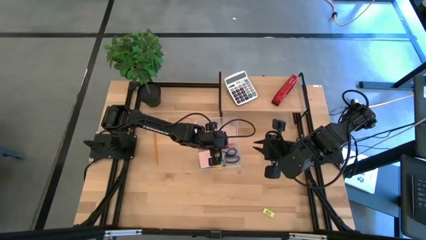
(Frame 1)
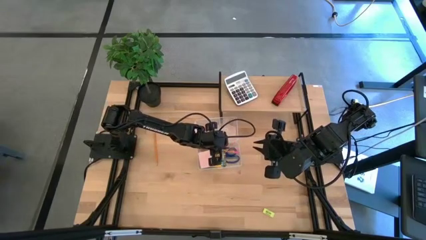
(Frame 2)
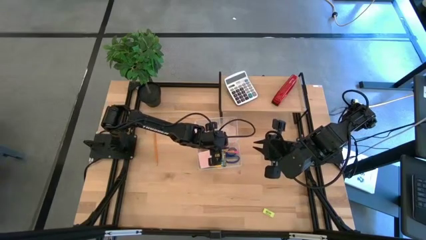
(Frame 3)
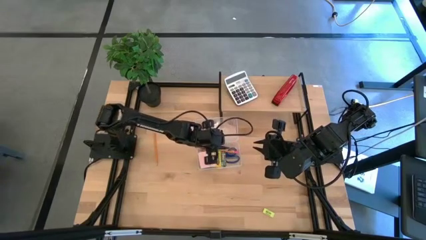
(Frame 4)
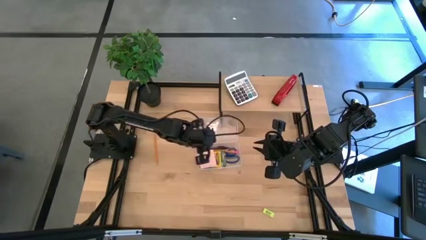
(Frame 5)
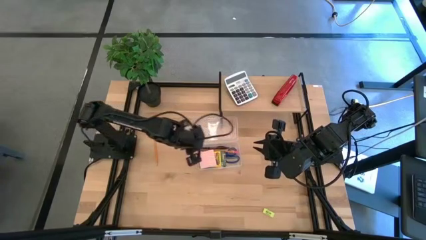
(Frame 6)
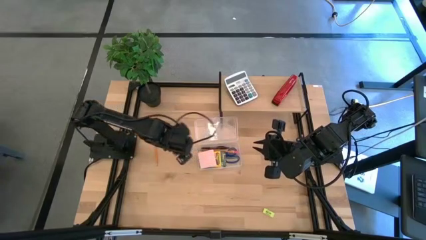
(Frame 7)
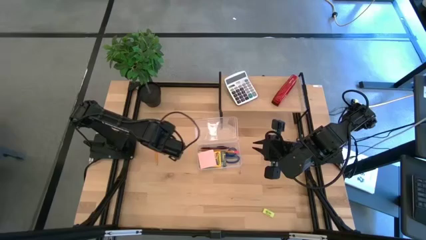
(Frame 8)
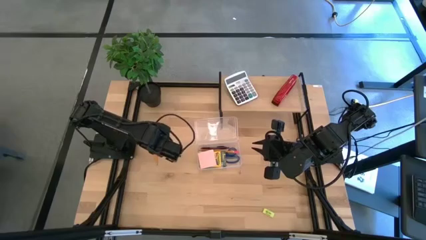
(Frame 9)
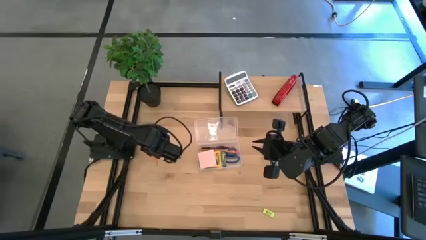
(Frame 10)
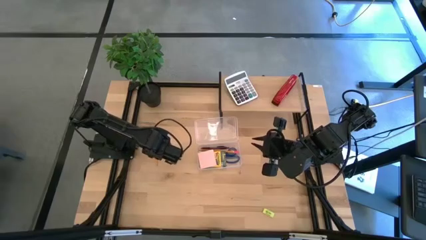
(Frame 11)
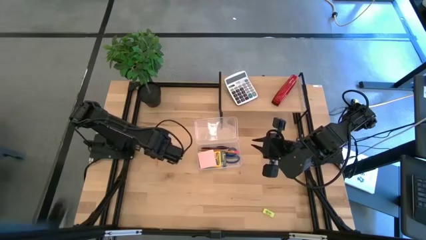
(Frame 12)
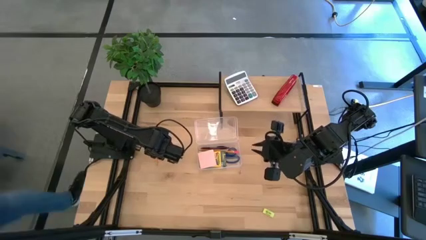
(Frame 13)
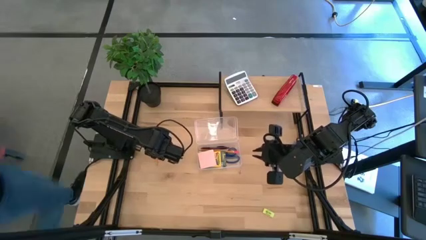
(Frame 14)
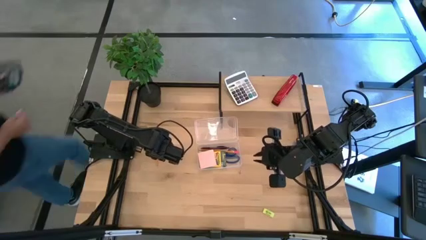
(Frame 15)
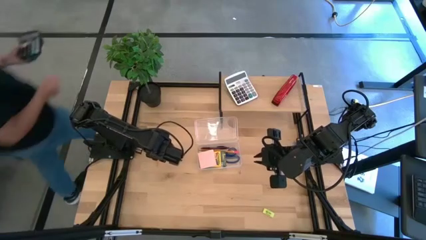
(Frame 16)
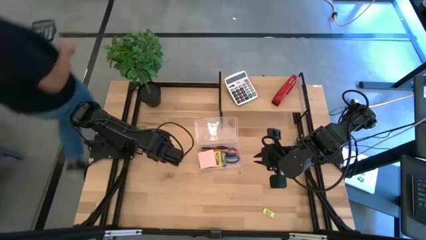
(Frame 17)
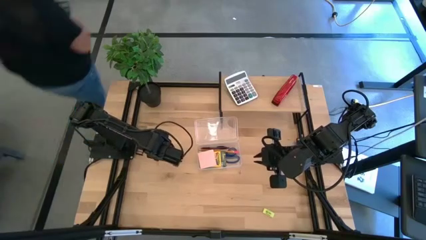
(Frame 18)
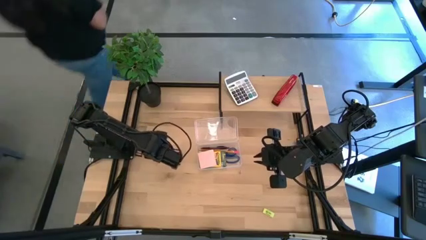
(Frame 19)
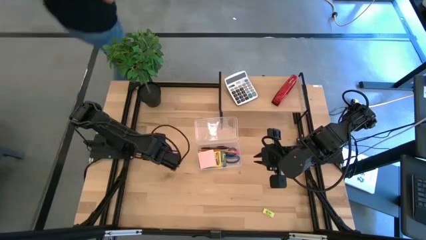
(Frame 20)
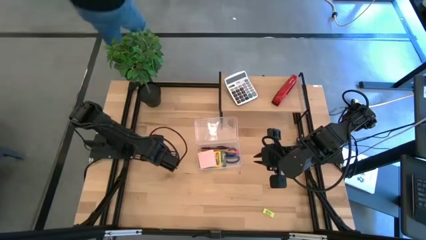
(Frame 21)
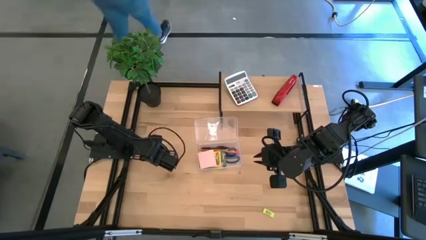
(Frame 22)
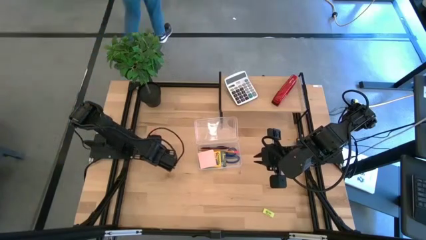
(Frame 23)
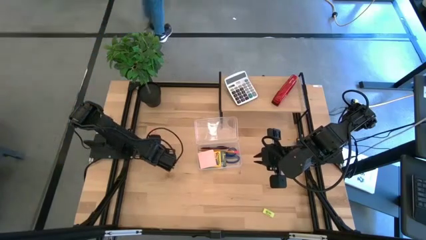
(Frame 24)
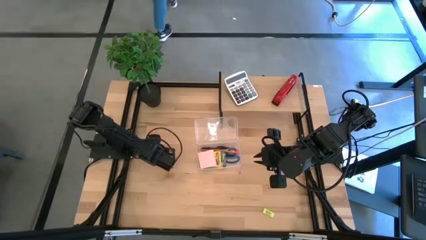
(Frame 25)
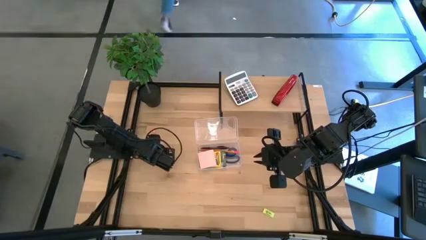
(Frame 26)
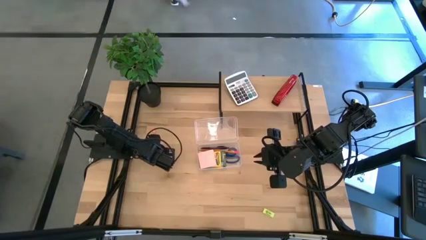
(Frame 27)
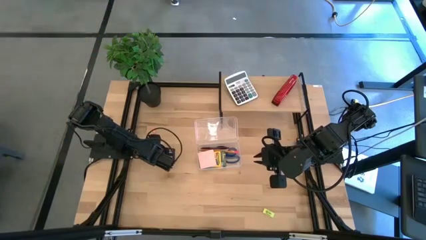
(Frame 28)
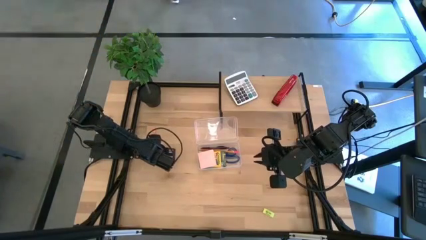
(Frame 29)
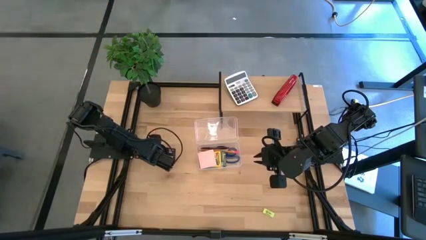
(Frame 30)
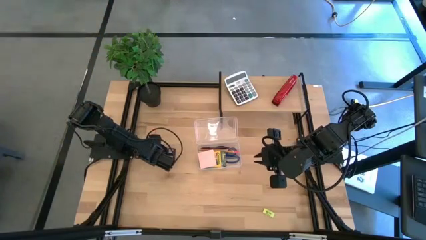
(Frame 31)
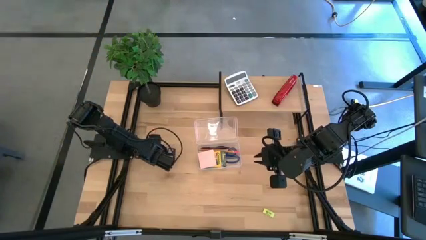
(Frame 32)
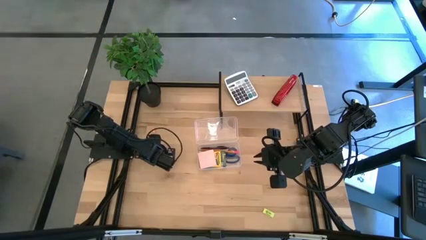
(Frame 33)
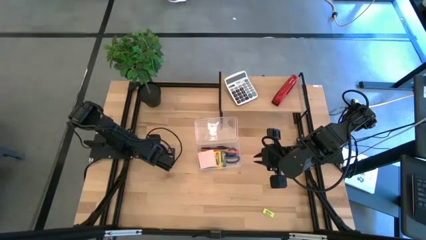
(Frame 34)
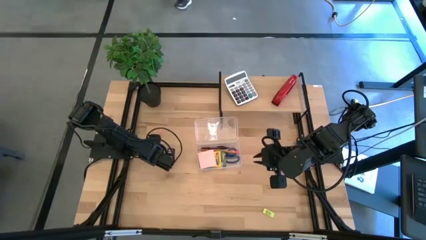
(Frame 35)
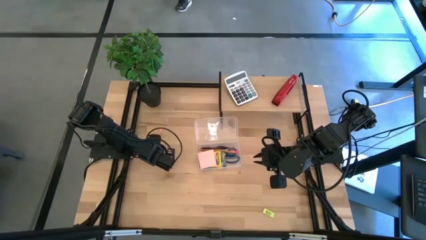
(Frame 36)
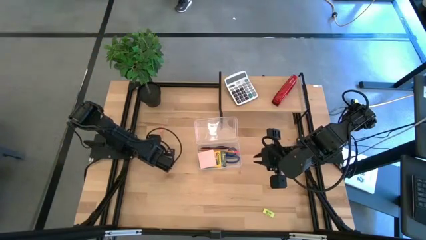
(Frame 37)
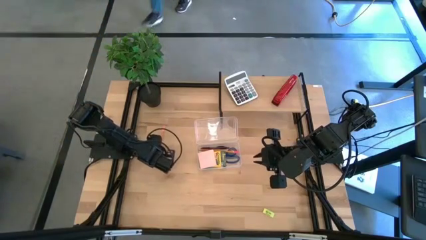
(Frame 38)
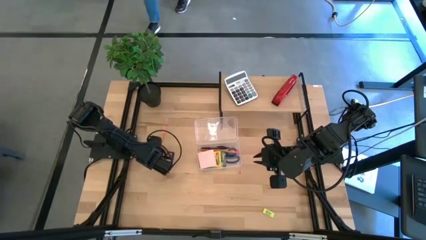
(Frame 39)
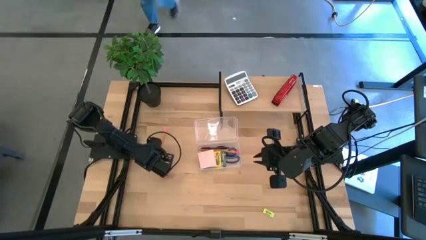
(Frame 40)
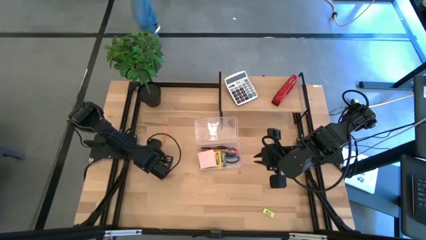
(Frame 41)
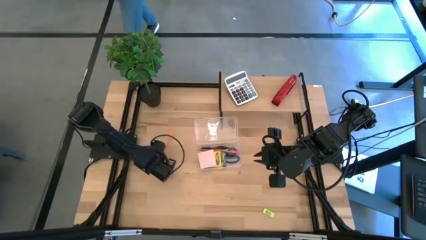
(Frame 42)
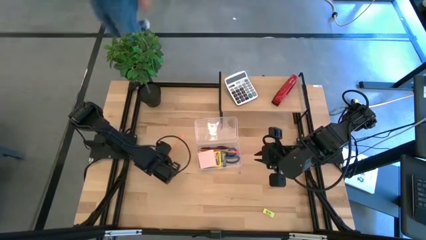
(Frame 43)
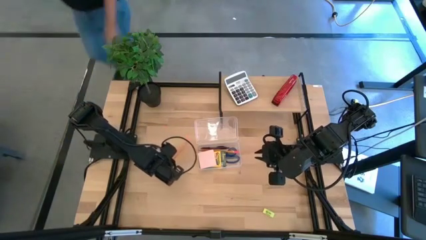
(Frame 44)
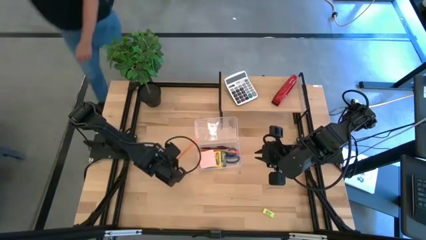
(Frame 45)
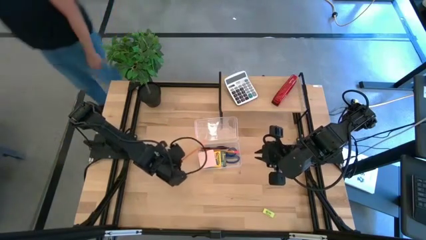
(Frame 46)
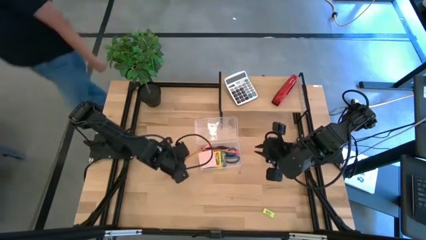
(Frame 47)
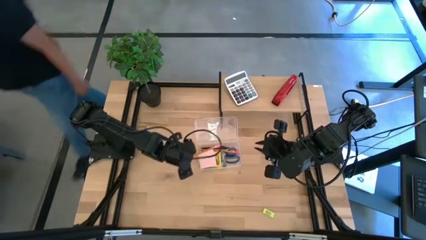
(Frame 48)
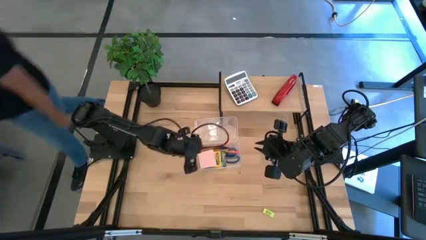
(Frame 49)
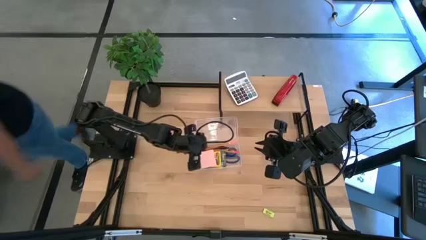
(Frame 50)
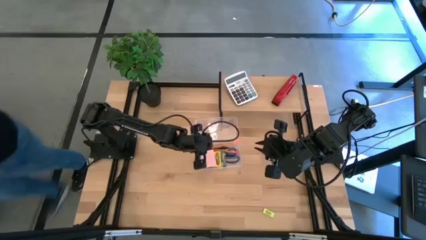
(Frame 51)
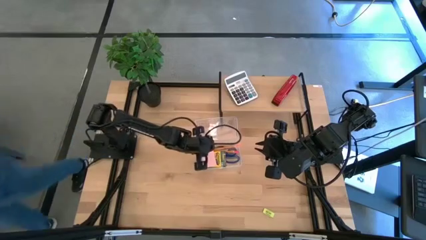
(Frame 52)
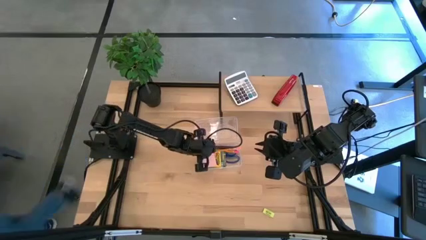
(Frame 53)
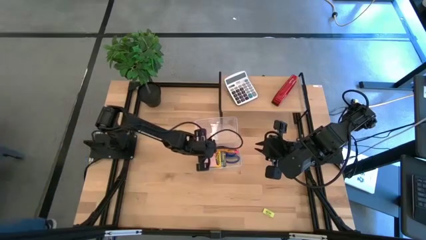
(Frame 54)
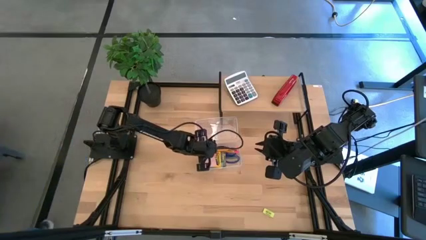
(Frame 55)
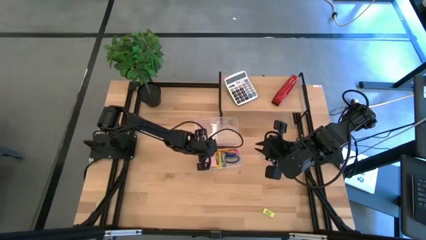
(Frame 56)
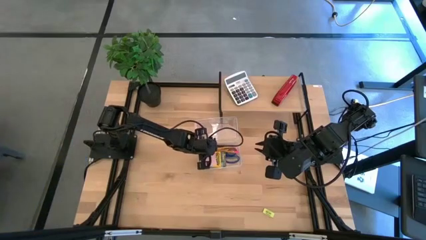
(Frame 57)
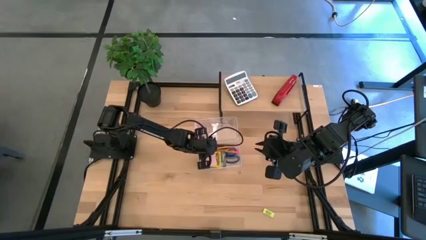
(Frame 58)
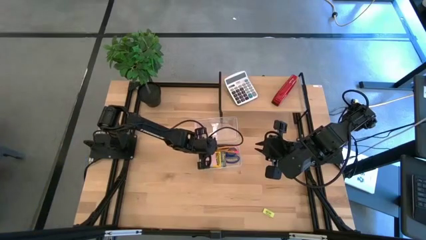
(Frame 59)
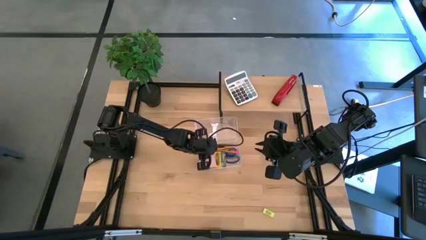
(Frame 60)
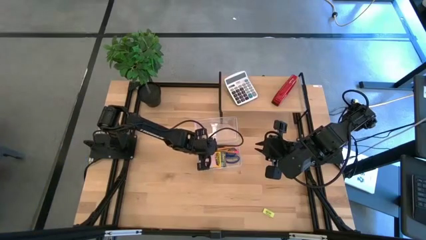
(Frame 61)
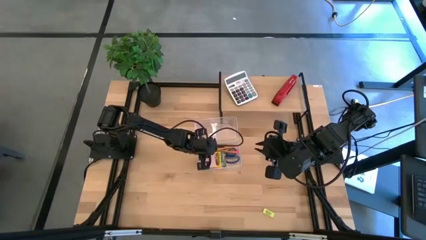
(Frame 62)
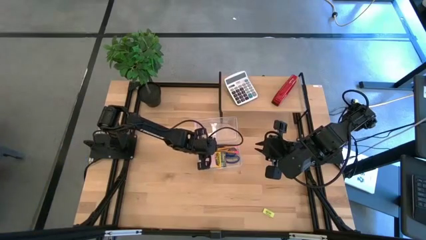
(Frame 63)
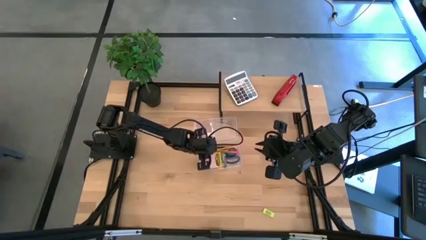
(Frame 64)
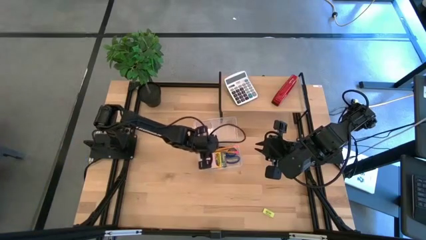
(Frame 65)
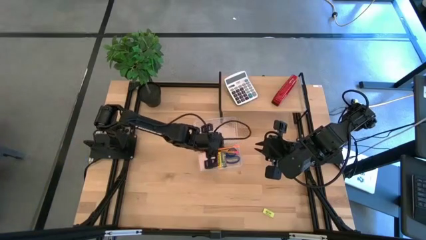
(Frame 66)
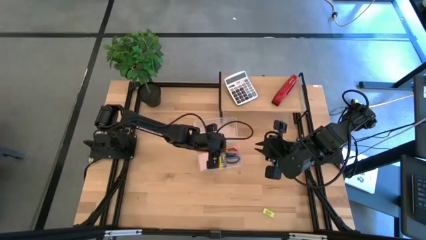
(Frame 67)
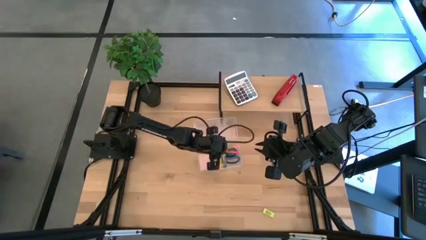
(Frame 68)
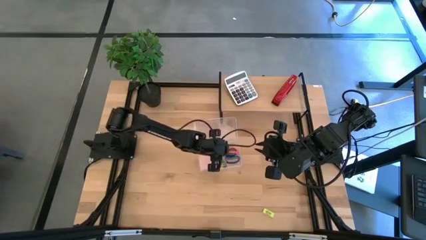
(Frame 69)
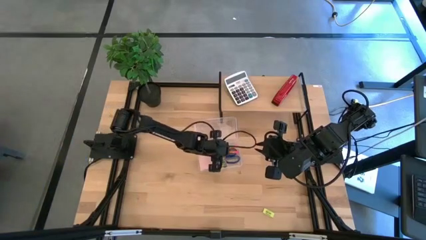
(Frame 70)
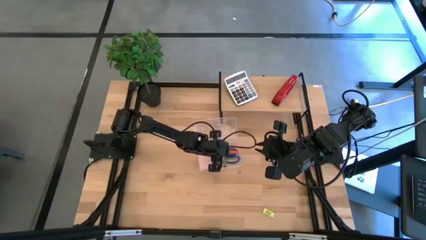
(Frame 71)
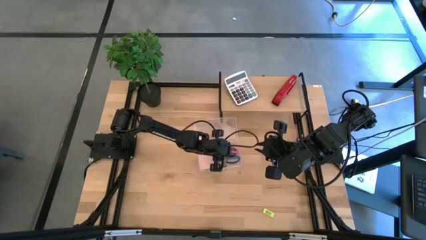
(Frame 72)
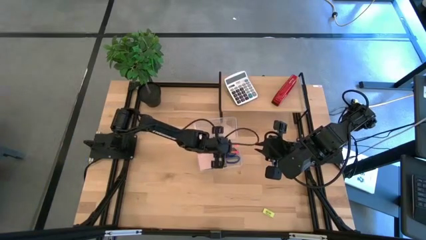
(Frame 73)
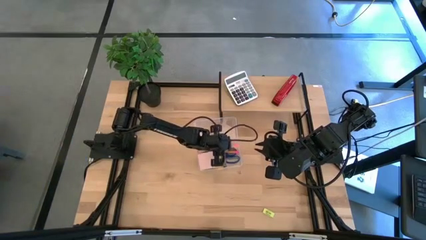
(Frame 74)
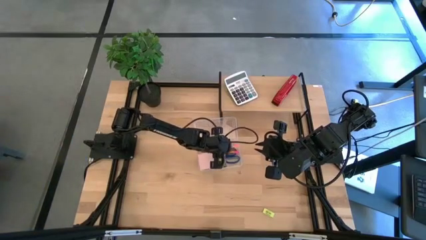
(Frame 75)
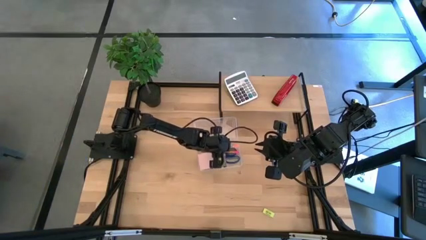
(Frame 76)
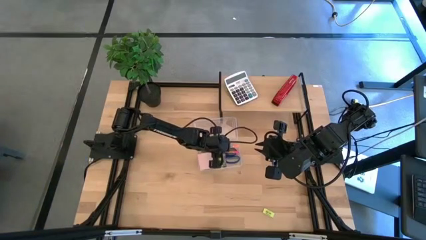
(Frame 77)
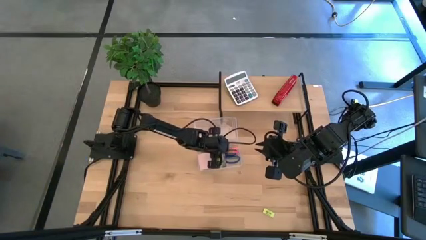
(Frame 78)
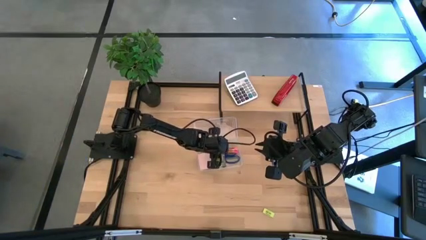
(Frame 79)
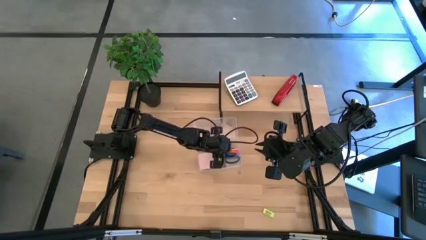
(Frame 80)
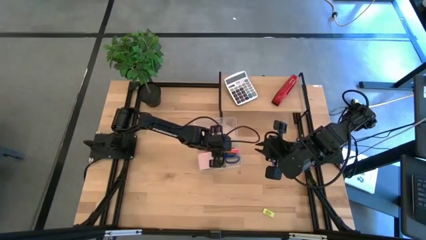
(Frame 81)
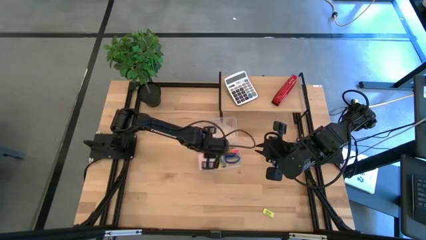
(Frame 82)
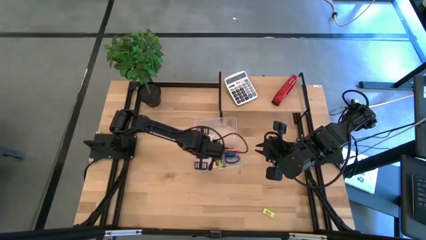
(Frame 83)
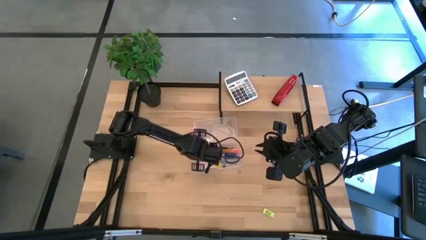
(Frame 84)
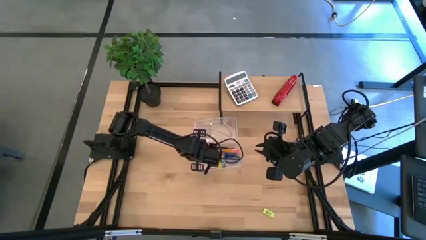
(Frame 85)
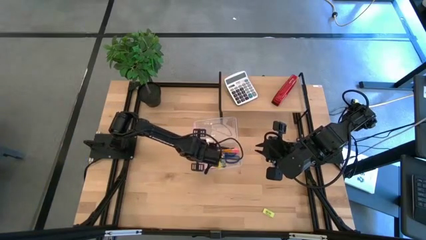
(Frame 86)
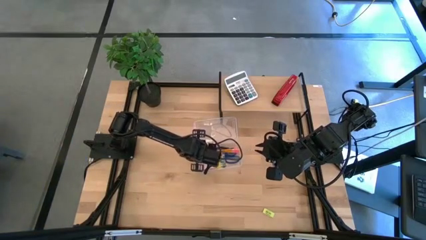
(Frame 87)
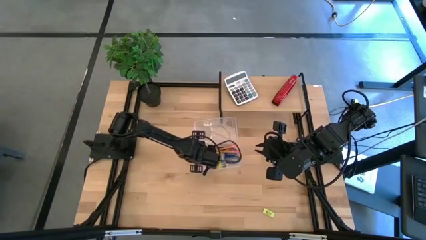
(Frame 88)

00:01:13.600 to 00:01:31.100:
Task: Pack school essentials
Put the orange pencil with the orange eraser into the transparent supply box
